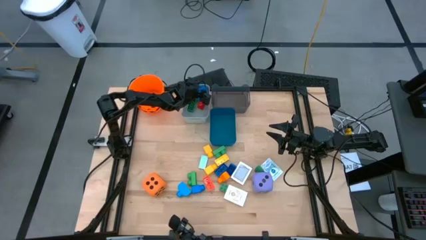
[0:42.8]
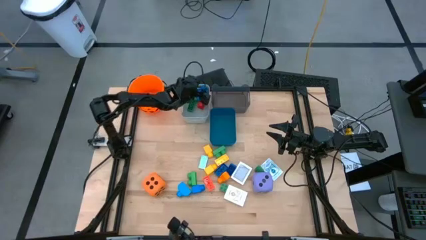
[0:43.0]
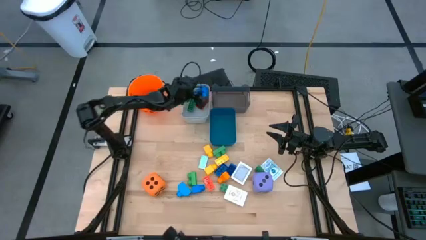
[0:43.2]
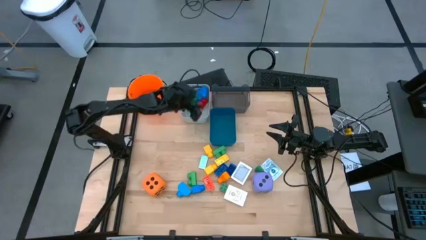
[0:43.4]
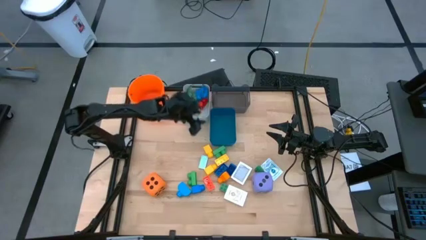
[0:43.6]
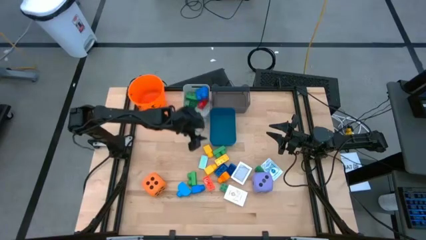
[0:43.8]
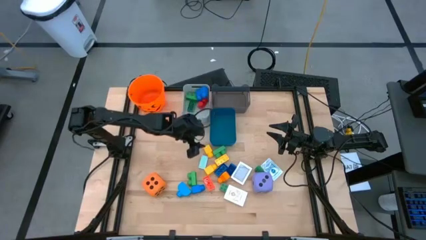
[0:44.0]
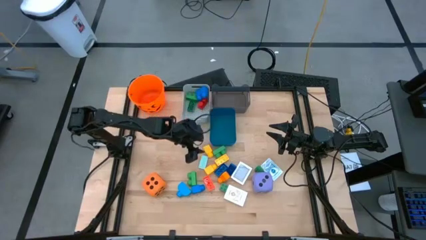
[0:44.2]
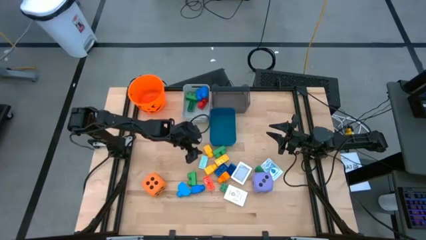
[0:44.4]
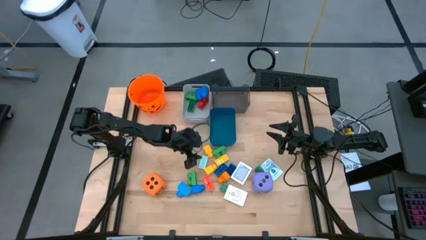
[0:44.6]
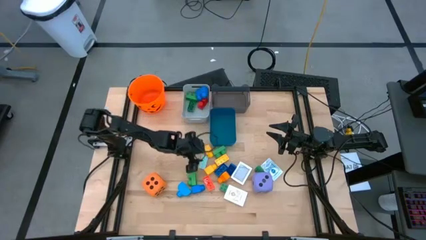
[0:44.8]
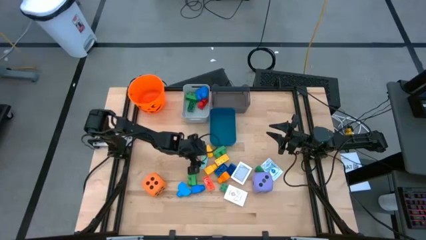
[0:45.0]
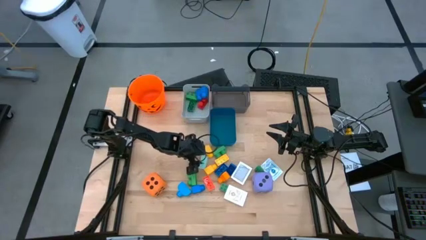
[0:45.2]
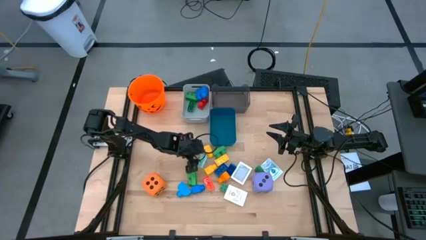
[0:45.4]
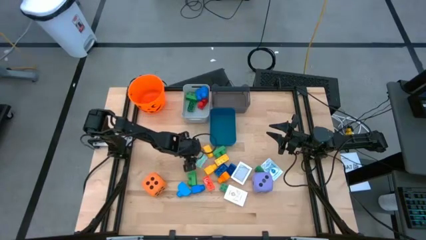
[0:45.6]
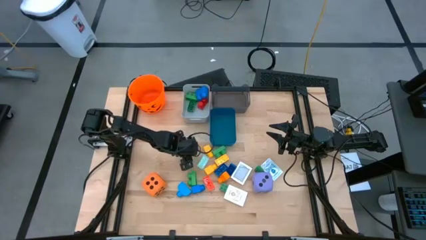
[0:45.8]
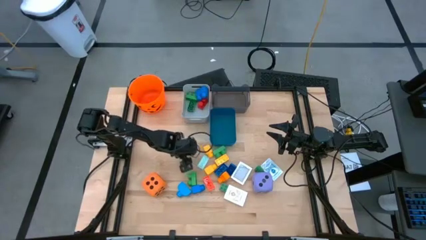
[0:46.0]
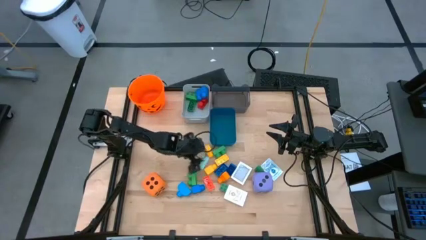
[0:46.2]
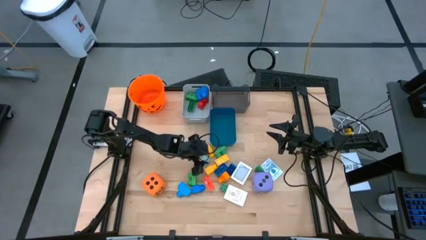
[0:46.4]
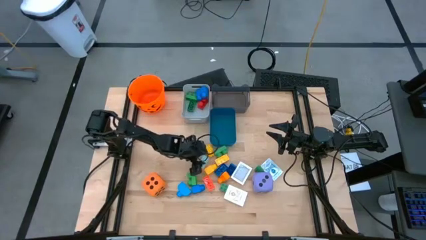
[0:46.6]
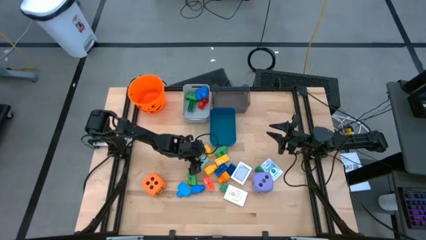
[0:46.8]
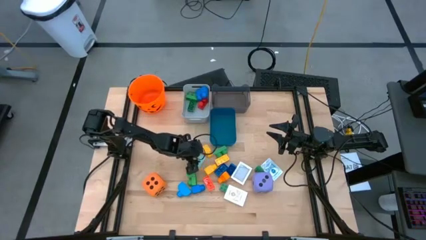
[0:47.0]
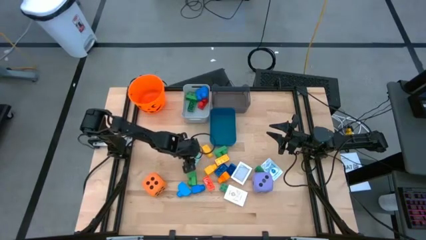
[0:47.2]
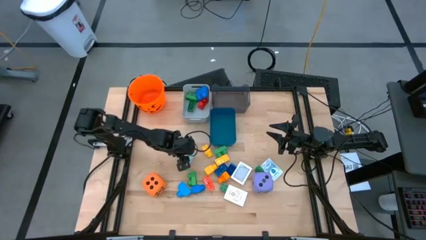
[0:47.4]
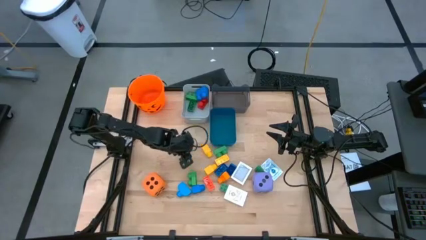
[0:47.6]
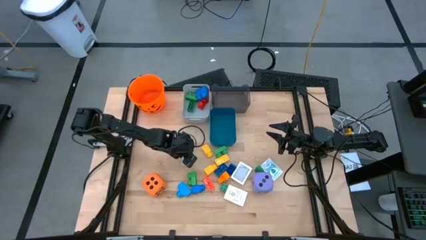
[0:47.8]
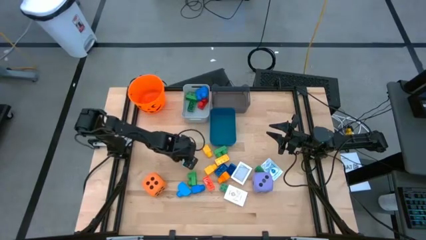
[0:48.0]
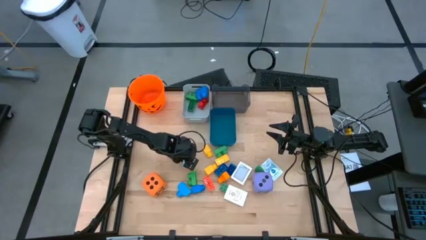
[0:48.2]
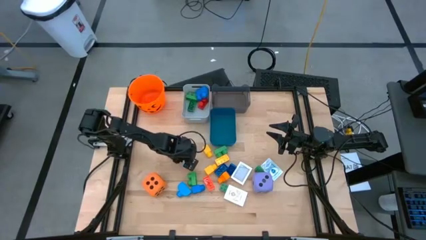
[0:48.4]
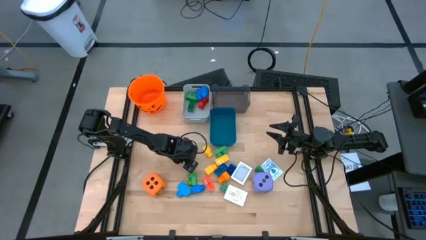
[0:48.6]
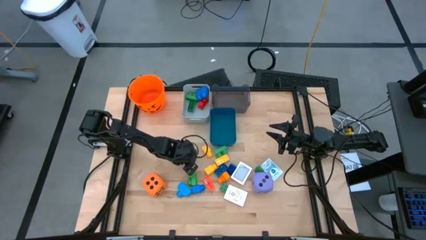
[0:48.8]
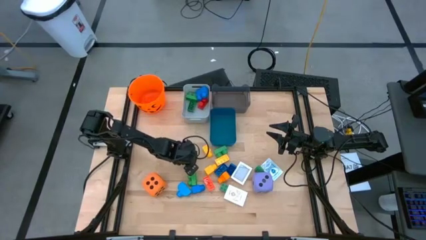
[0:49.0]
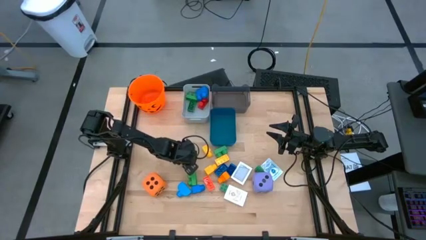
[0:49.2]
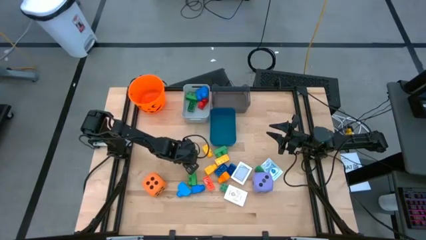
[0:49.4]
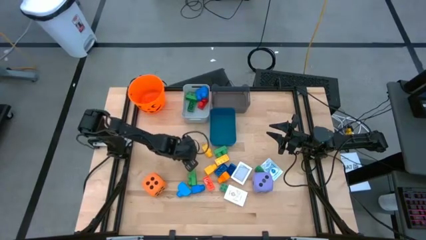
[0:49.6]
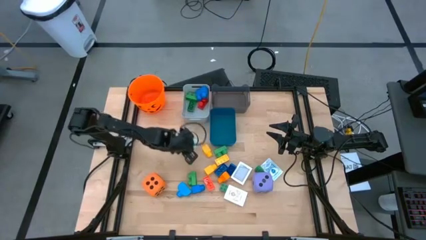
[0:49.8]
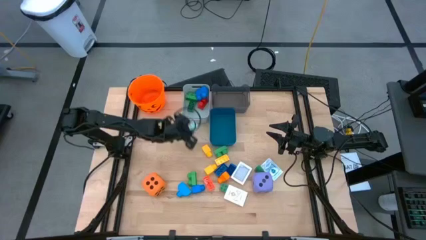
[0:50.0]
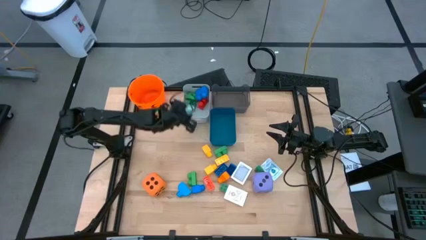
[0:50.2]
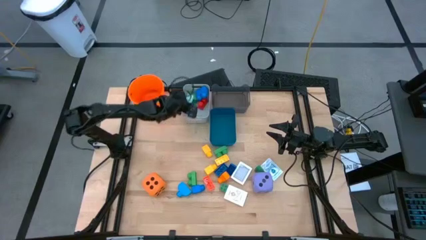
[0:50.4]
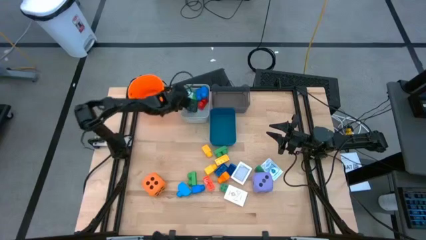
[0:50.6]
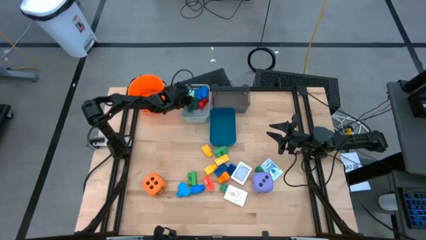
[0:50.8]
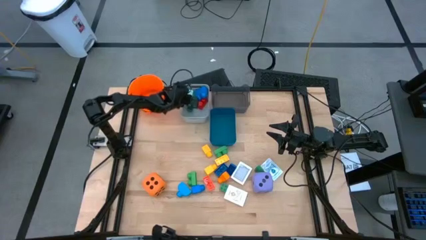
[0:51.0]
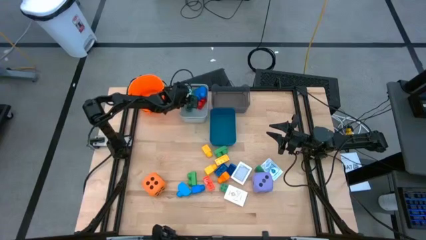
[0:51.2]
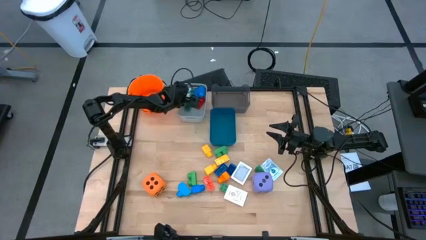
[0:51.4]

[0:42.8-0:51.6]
Task: Pick & Place Toys
Put the small white gamepiece into the white bin

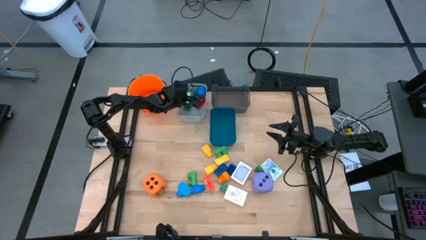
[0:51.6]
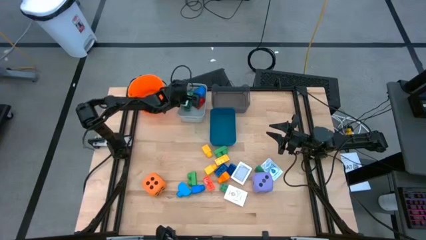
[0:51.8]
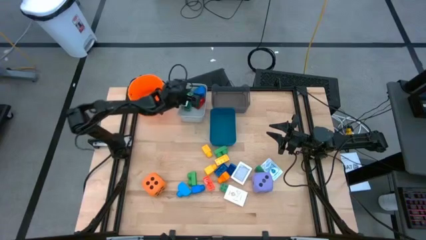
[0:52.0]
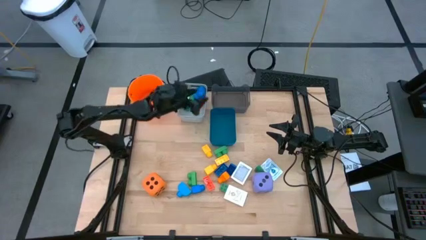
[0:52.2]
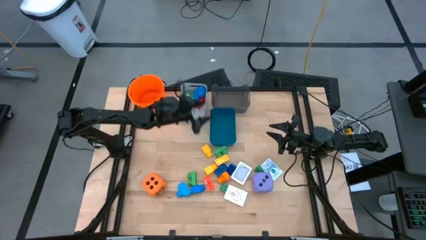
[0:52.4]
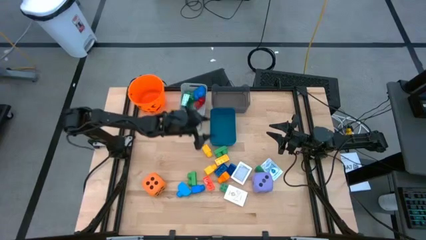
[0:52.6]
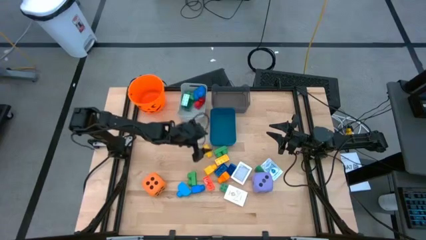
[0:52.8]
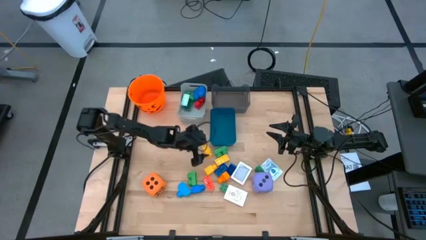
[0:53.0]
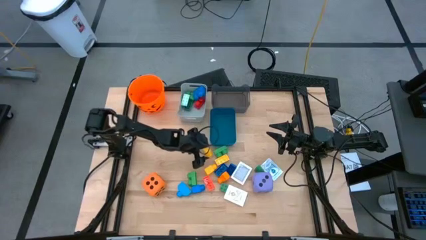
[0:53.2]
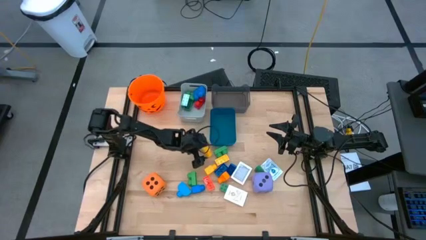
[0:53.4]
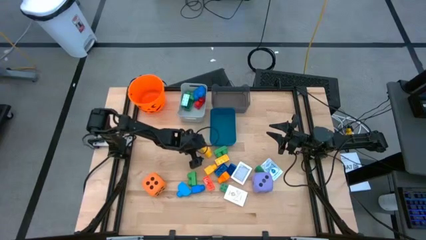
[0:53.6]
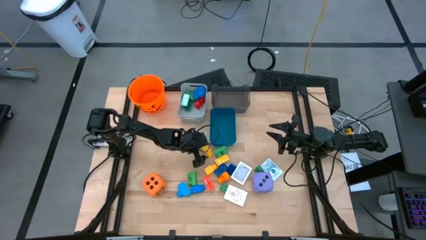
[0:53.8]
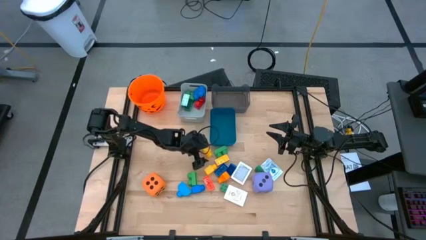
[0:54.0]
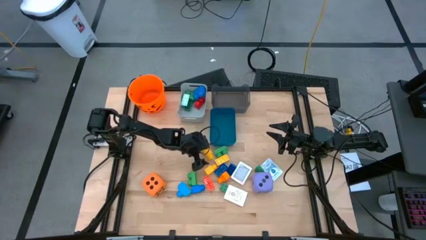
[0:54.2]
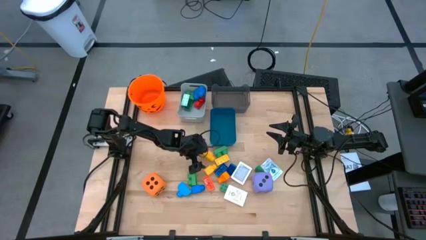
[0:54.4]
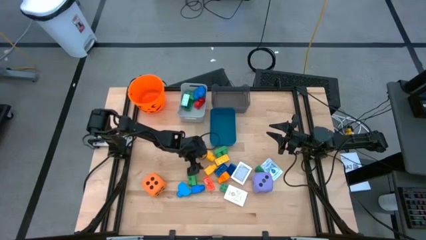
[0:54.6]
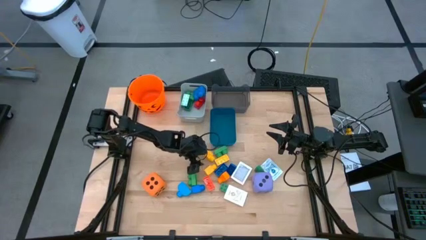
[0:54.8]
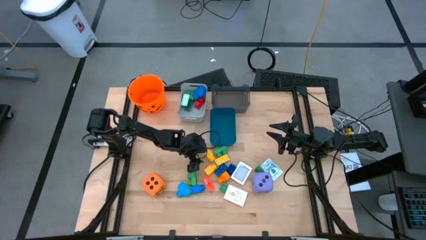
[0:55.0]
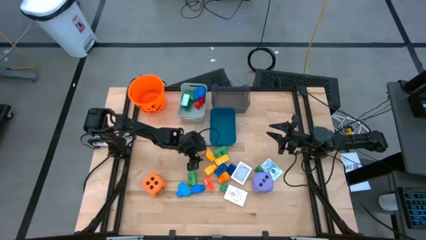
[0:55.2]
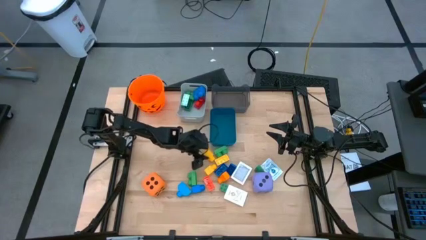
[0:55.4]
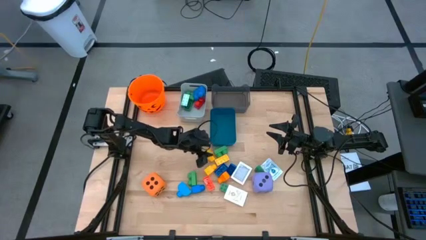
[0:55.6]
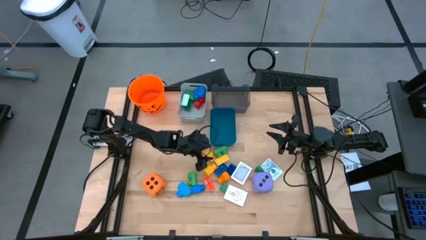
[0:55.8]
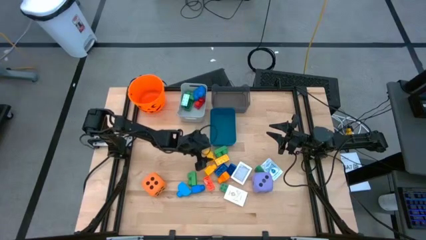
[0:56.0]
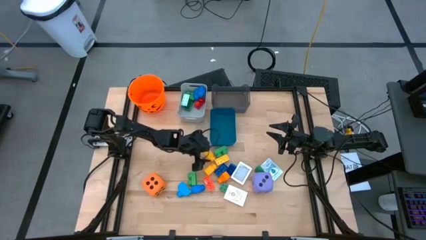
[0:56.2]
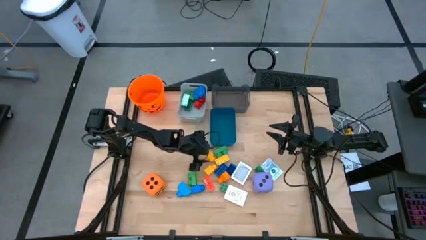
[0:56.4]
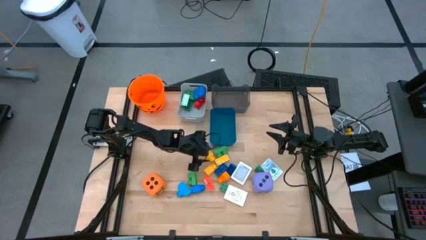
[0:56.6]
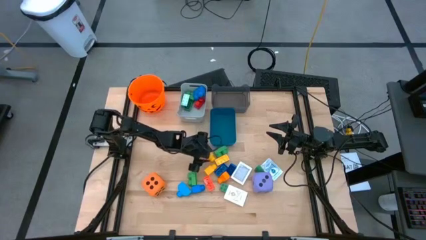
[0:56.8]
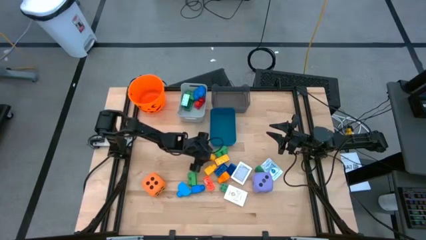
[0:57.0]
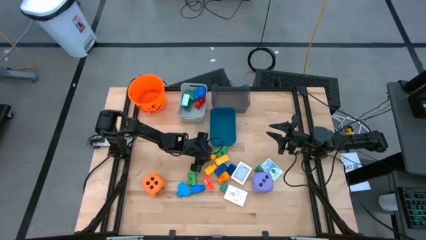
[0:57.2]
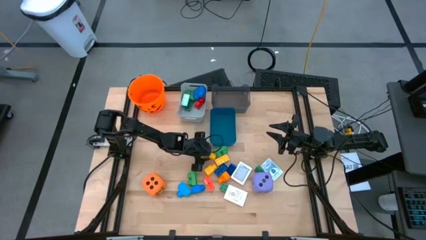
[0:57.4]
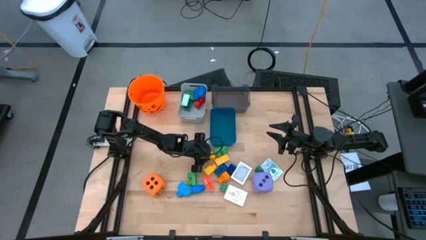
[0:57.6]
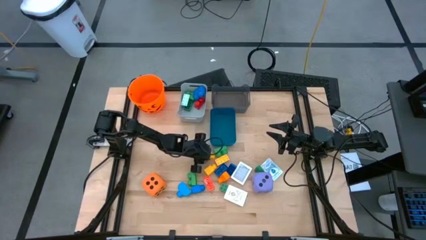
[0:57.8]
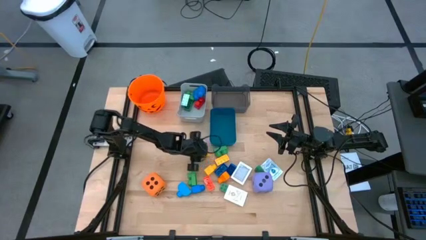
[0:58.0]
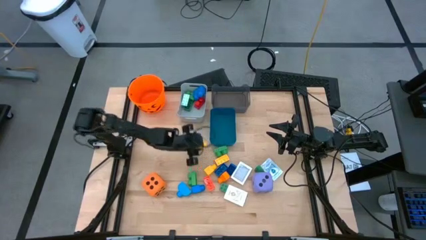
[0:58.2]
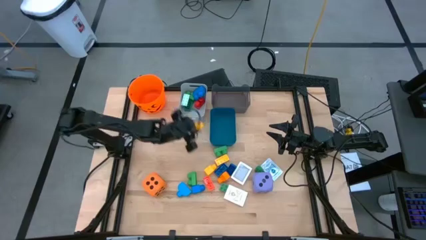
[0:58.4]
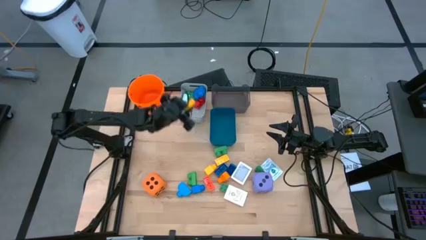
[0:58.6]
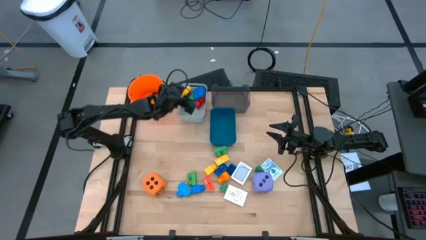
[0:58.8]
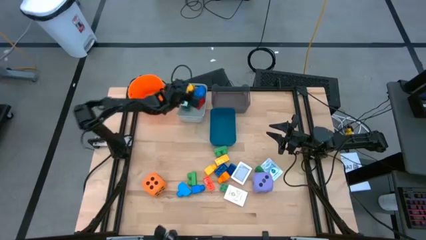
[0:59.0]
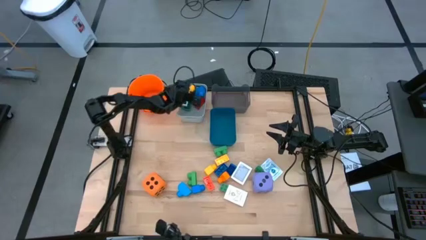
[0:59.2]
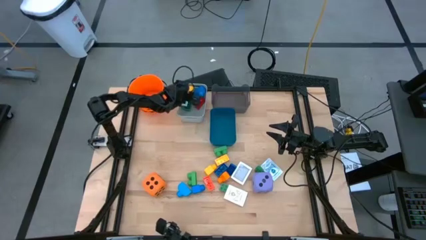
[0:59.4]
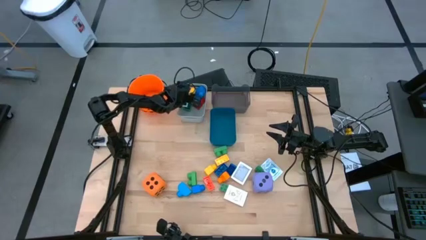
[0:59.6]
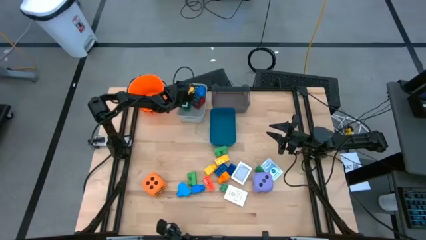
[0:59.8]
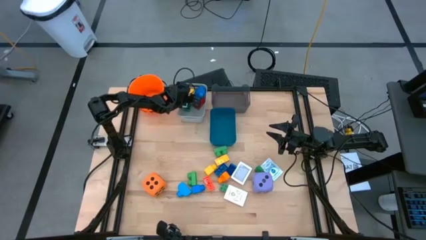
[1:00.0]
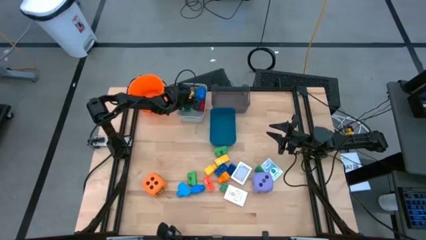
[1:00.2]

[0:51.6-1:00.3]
Put the yellow 1 stud gamepiece into the white bin
